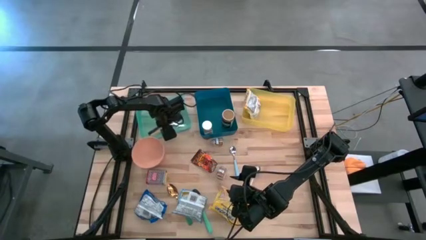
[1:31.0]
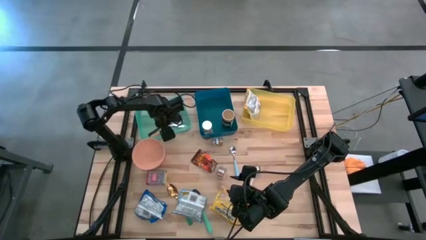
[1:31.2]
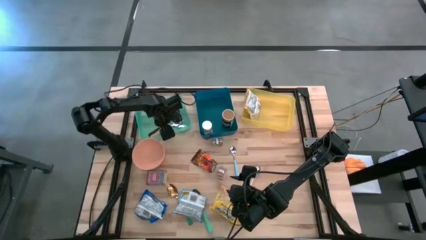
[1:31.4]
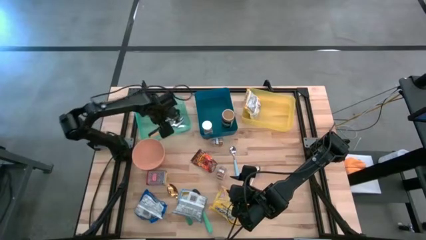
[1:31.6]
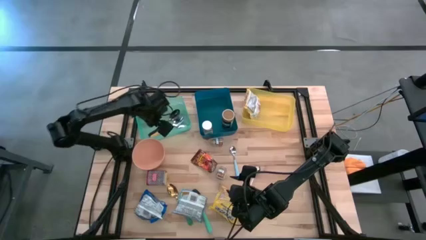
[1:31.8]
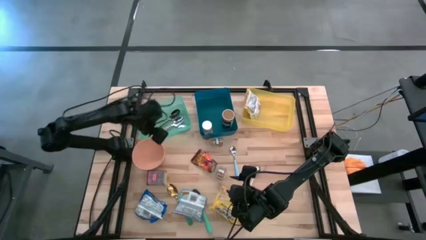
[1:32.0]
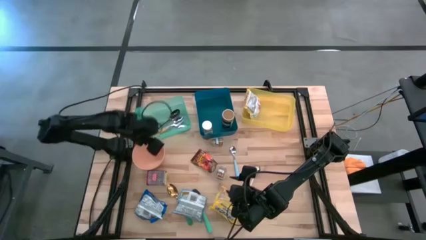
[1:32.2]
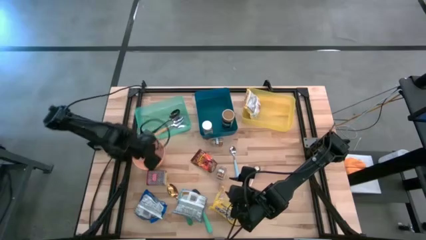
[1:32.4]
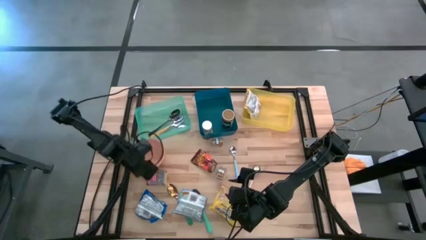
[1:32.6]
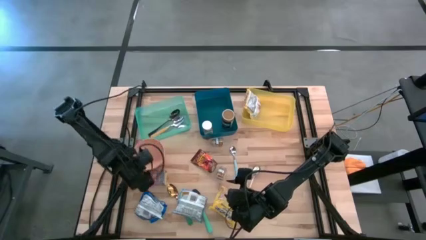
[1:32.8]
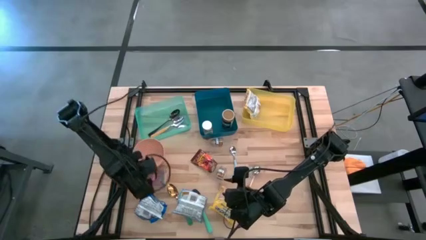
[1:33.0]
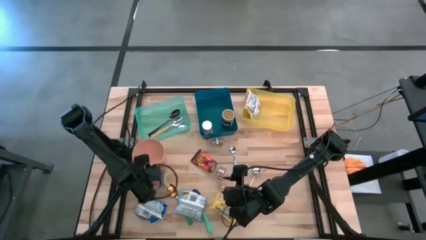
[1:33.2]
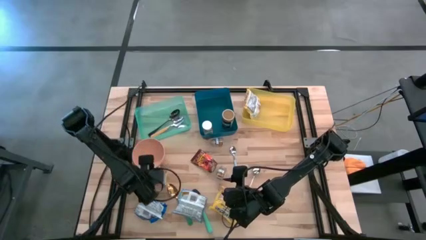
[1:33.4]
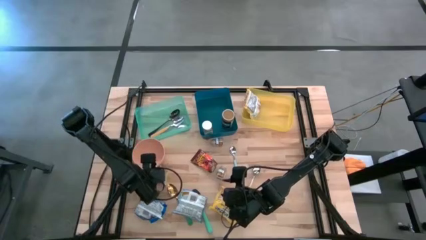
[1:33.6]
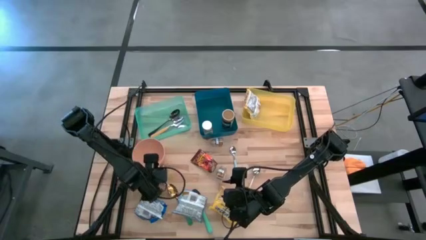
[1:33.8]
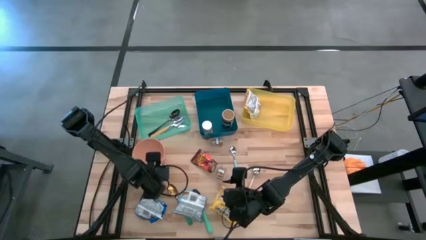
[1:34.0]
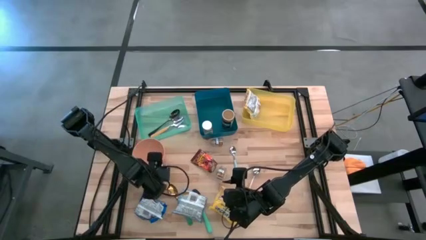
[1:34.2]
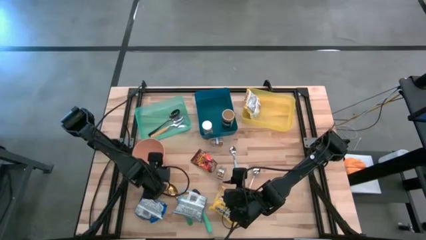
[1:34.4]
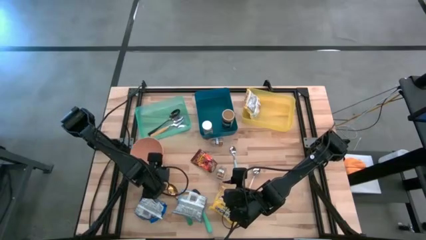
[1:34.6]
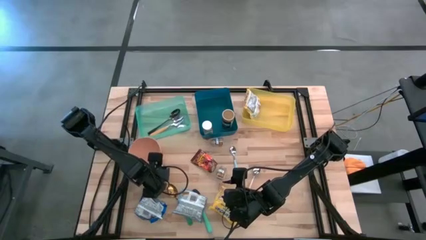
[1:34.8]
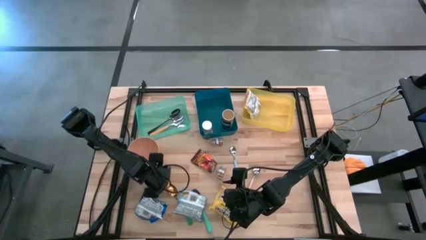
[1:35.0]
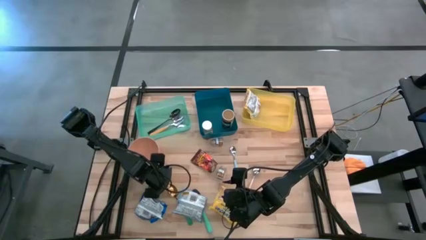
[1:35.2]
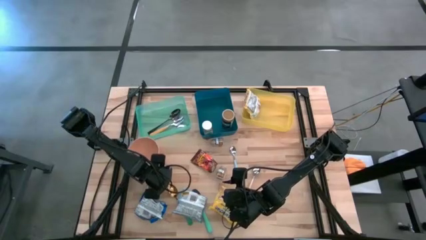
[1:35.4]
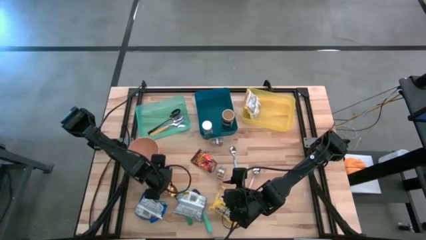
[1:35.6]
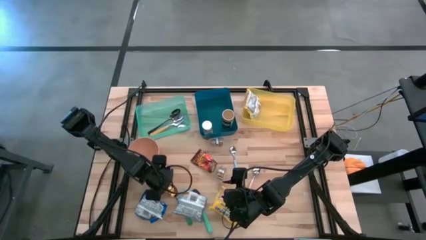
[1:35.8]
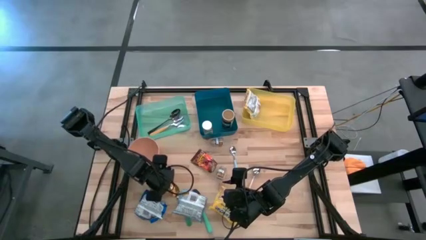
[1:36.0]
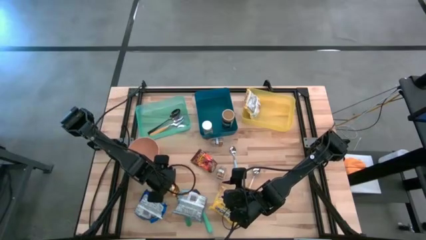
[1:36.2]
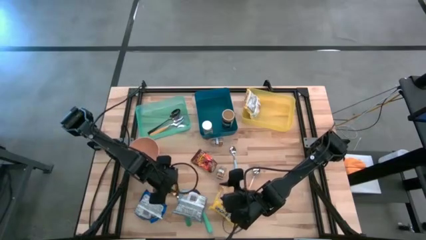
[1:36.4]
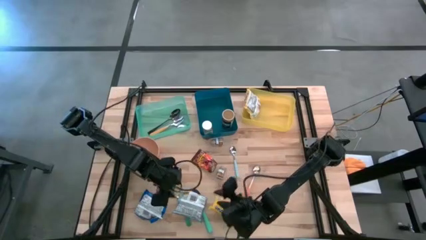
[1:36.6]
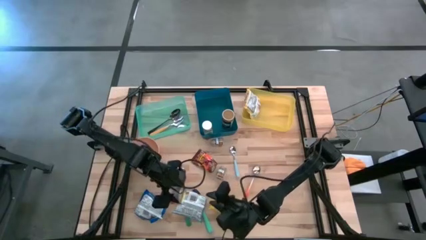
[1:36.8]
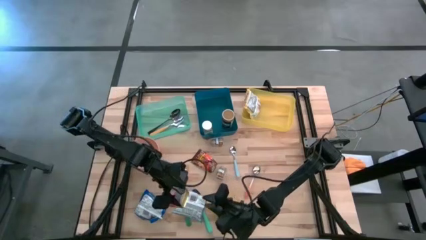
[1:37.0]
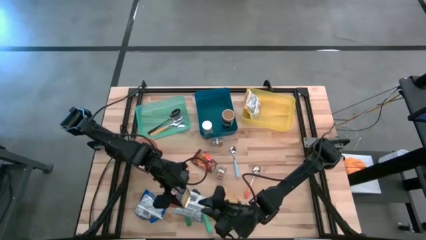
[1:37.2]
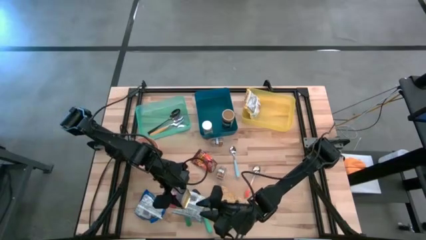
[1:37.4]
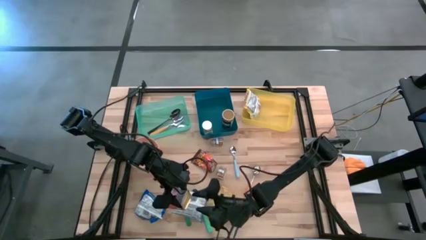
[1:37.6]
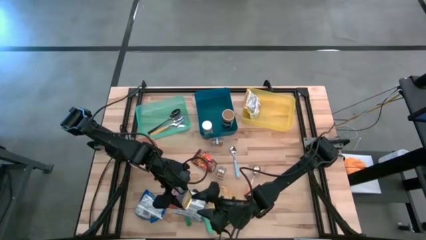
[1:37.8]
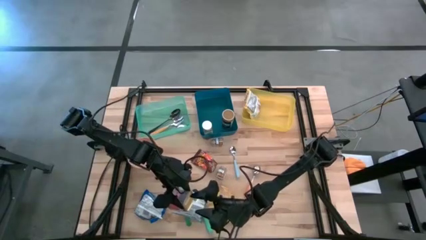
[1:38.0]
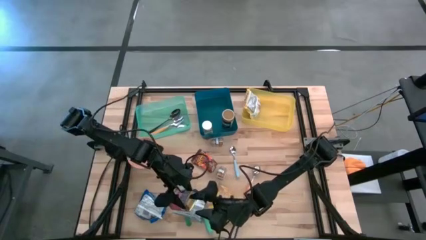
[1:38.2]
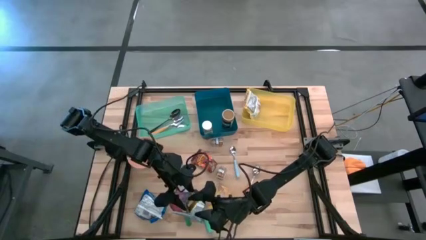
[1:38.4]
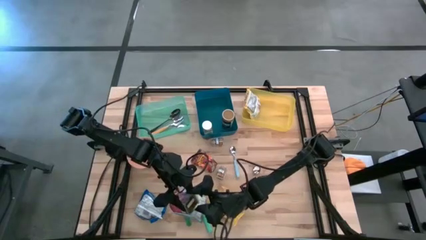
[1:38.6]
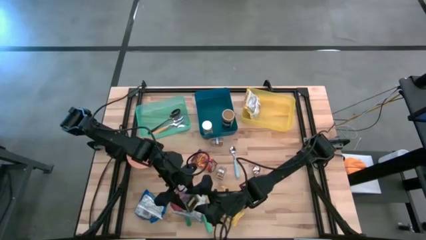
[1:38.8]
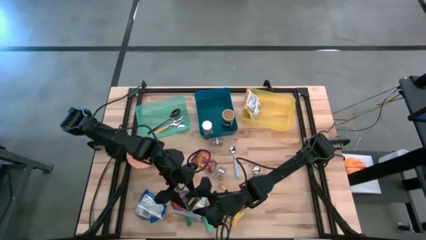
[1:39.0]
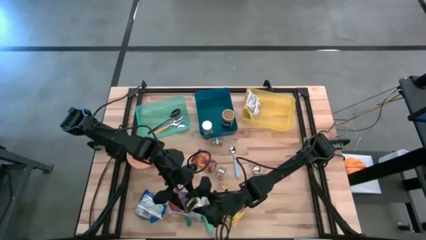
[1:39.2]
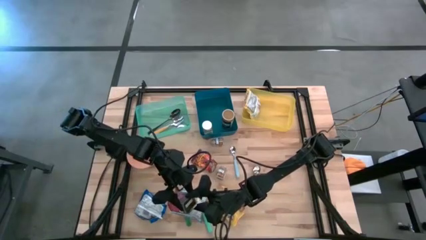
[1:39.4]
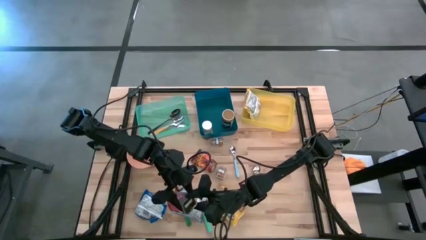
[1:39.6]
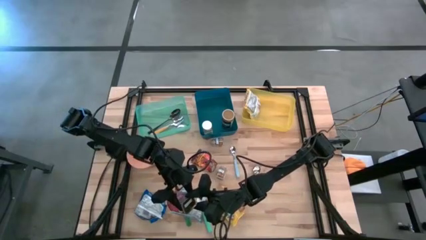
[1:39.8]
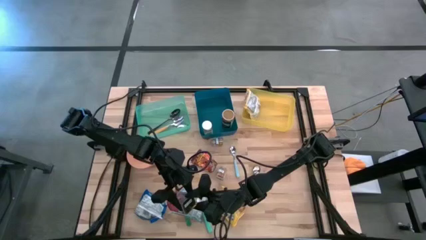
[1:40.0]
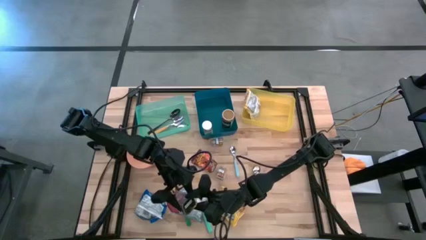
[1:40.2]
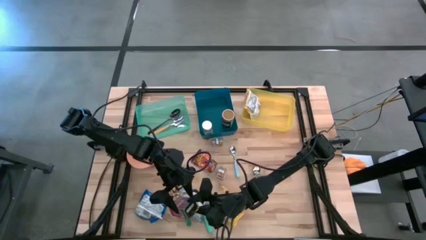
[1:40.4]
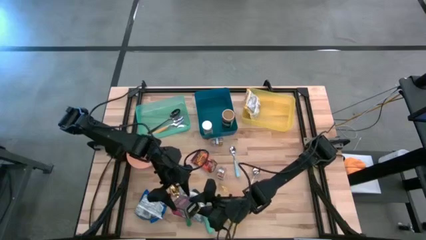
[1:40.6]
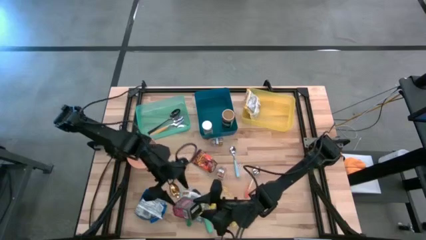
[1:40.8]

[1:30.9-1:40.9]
Put the red seasoning can into the blue bin

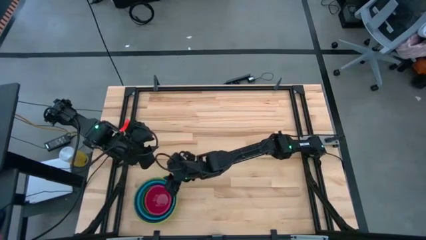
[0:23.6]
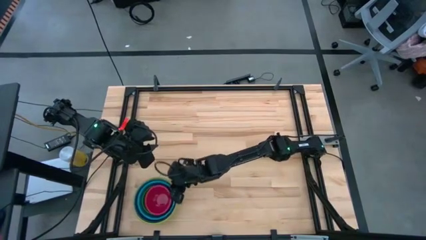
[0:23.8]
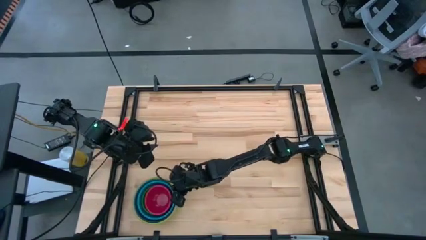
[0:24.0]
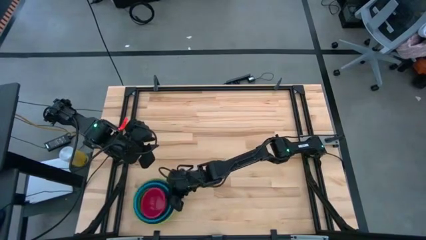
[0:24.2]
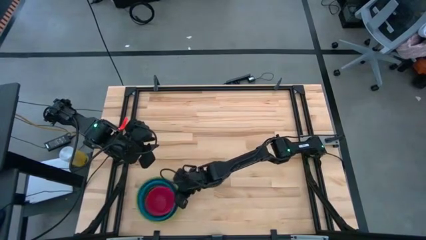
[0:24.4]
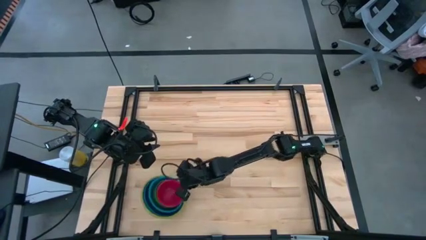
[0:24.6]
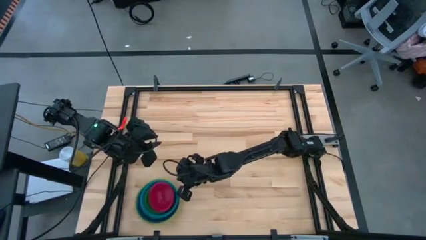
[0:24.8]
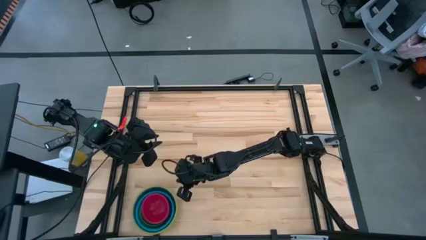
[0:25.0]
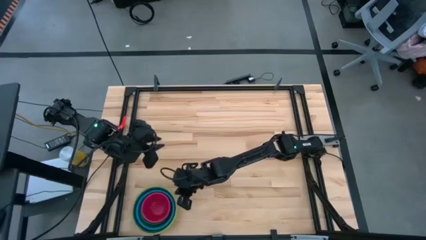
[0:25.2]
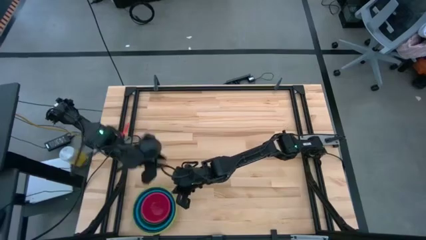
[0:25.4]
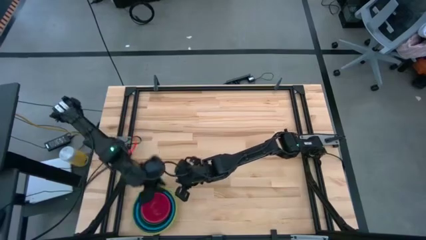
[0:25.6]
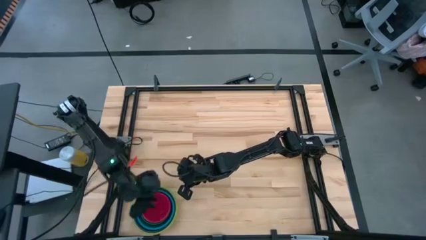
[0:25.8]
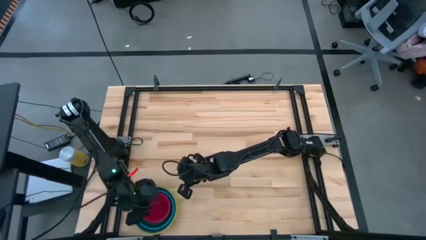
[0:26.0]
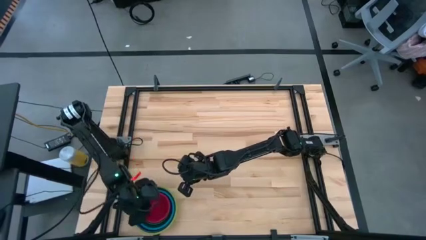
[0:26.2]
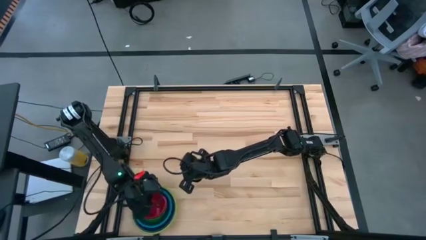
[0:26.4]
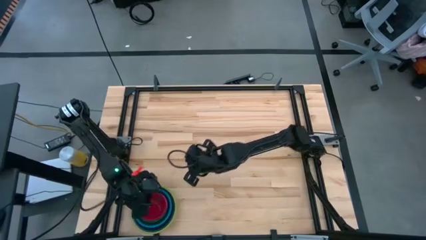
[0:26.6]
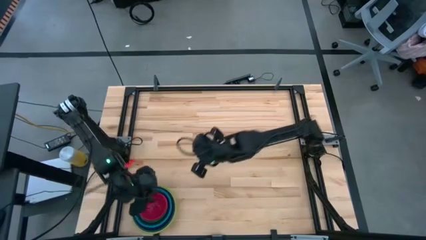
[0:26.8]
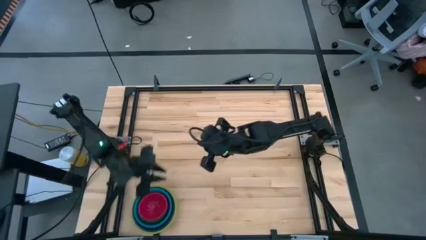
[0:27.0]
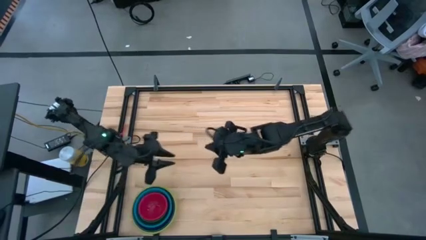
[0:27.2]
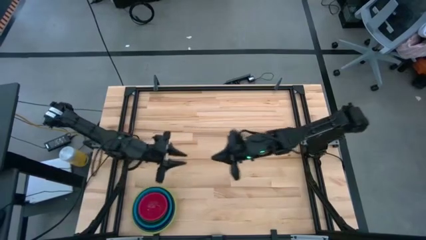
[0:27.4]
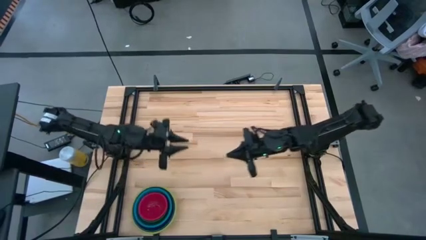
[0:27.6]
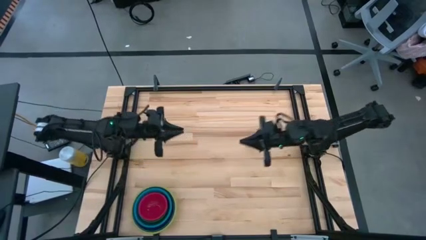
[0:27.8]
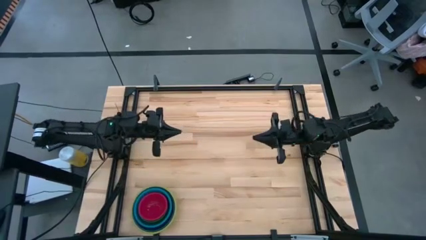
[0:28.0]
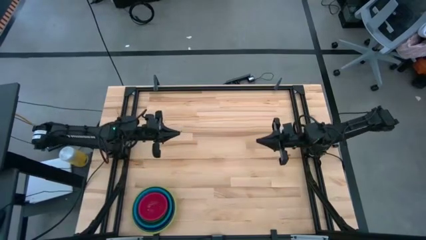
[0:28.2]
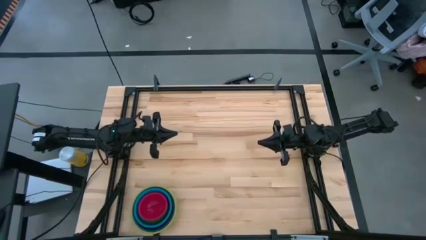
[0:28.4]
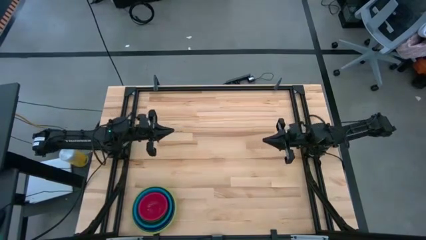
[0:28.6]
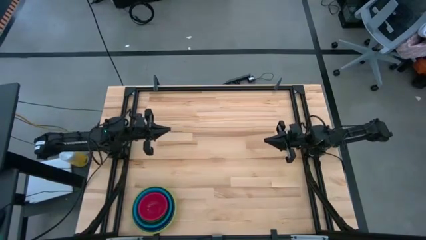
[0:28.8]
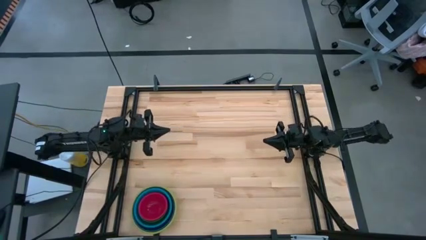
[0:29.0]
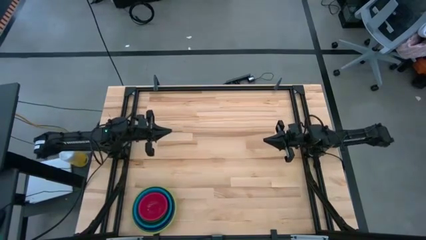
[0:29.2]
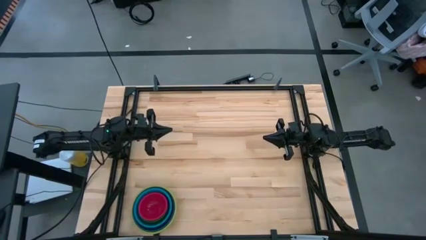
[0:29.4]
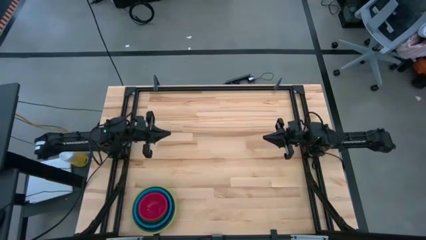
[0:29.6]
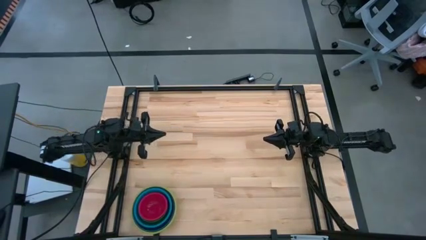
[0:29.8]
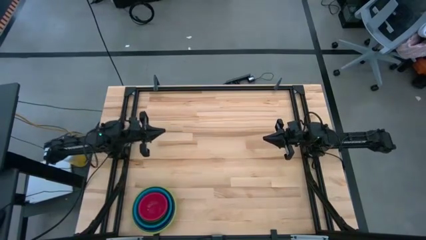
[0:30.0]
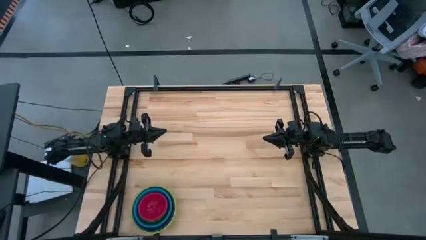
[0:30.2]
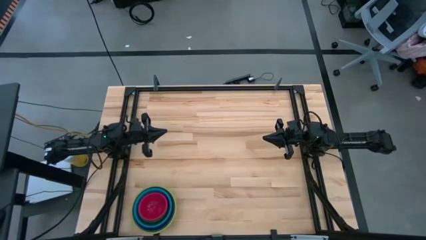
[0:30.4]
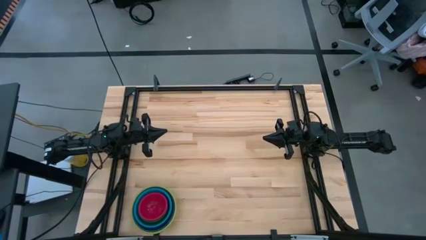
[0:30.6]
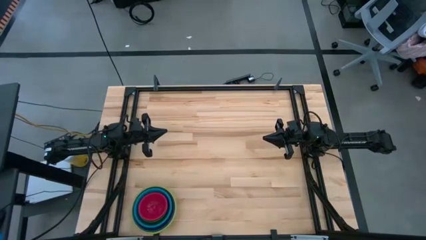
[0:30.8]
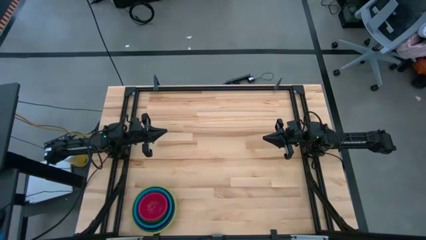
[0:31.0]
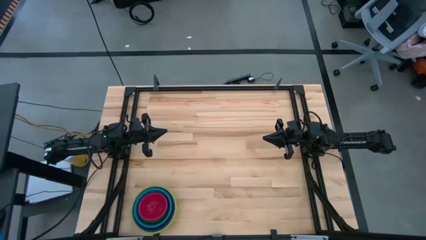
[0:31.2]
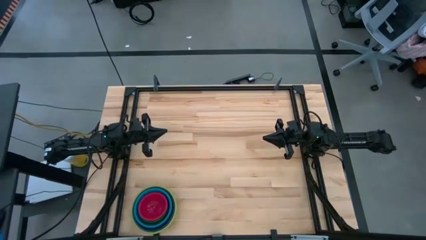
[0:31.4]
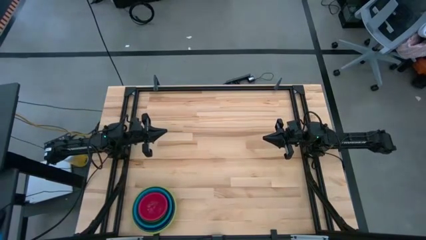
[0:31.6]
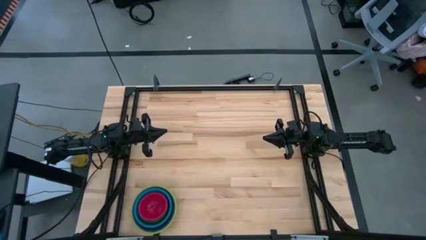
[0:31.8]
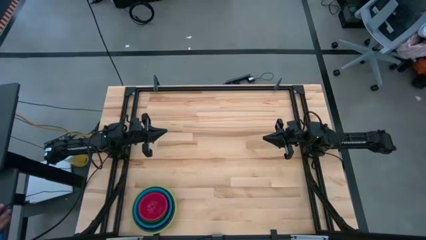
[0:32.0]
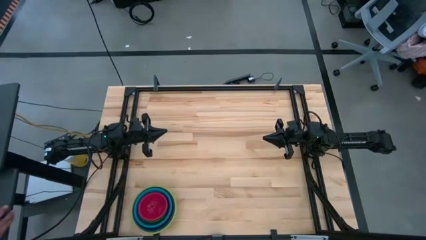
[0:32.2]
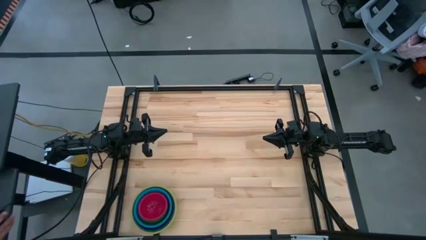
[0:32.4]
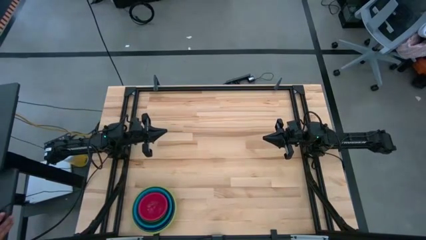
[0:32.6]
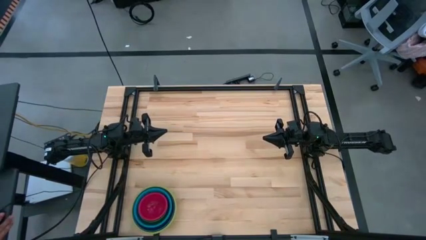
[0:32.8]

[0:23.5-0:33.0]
Return to Home Position
